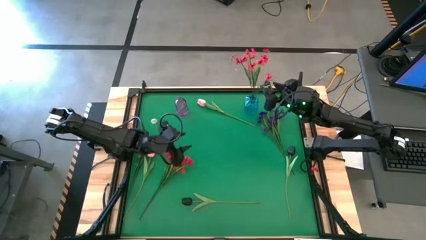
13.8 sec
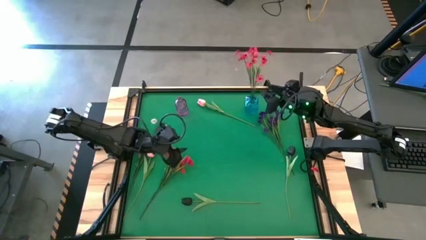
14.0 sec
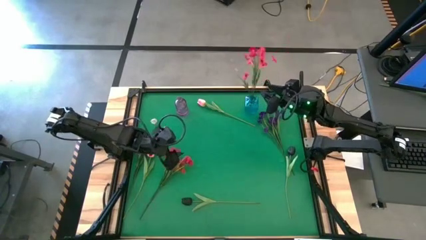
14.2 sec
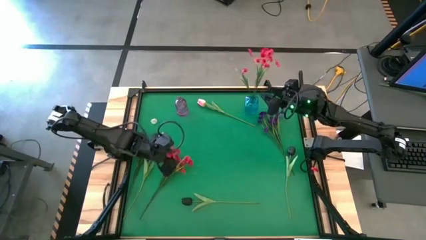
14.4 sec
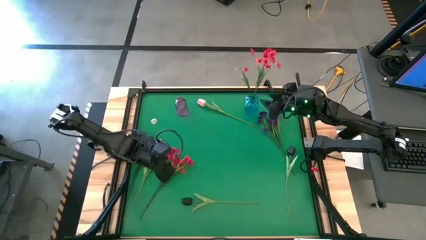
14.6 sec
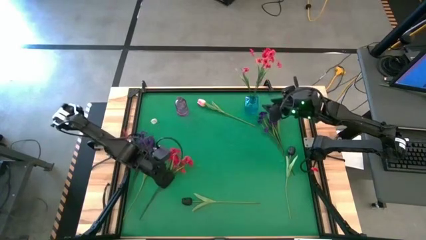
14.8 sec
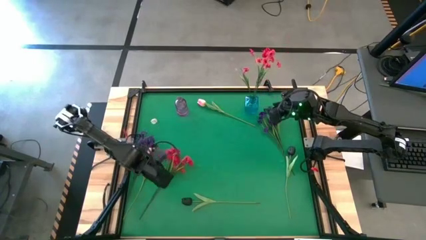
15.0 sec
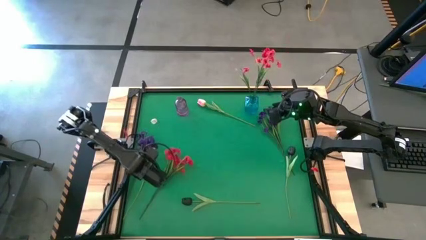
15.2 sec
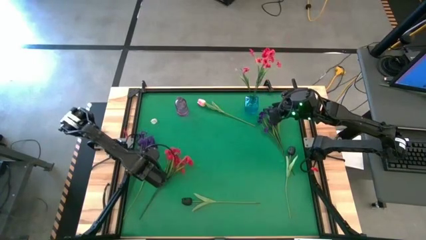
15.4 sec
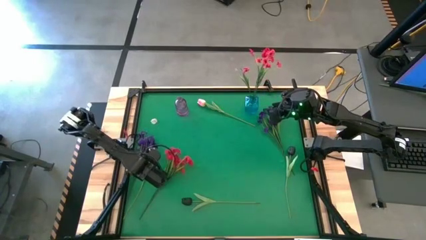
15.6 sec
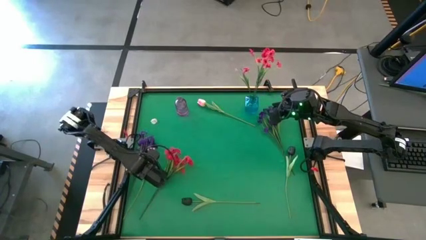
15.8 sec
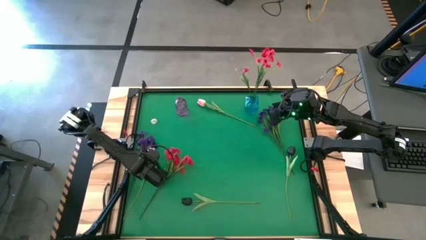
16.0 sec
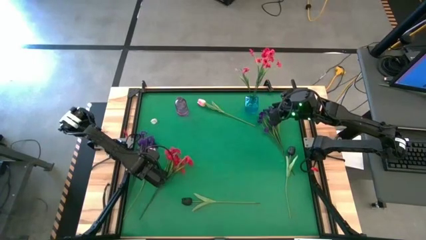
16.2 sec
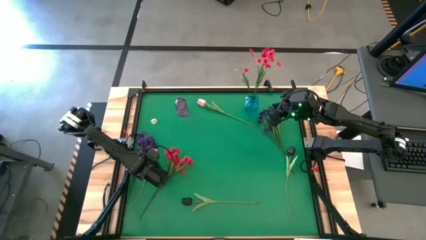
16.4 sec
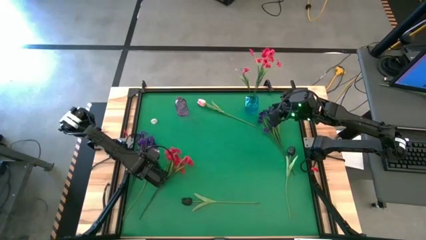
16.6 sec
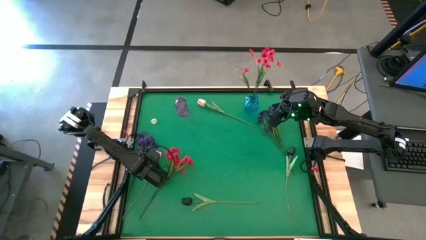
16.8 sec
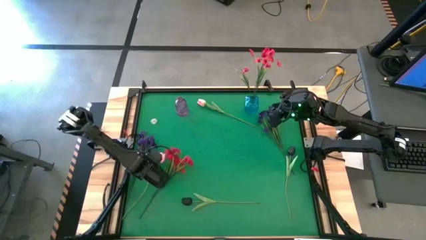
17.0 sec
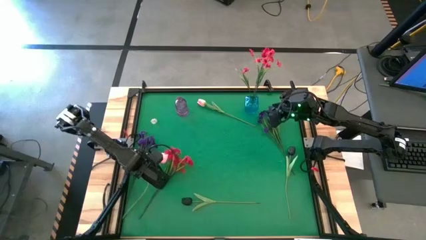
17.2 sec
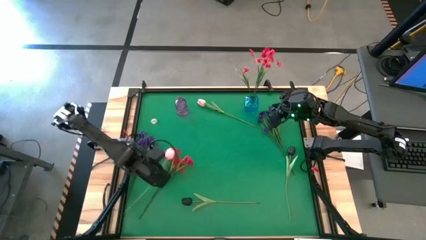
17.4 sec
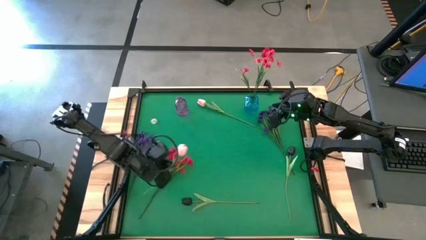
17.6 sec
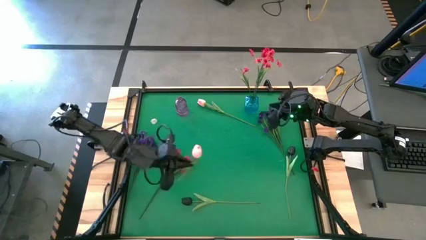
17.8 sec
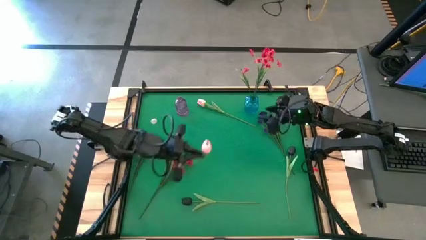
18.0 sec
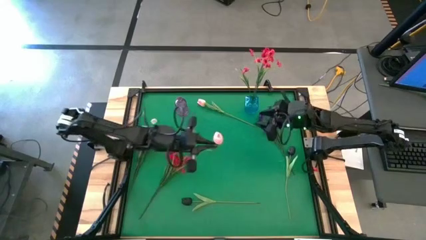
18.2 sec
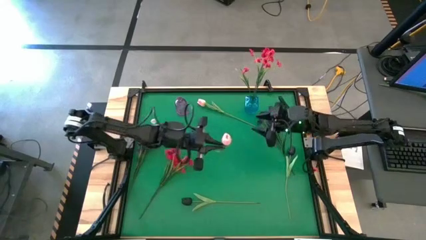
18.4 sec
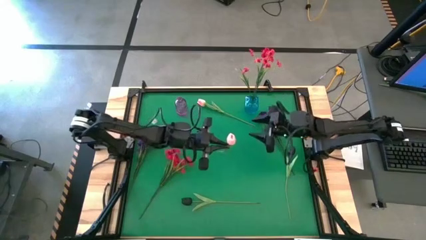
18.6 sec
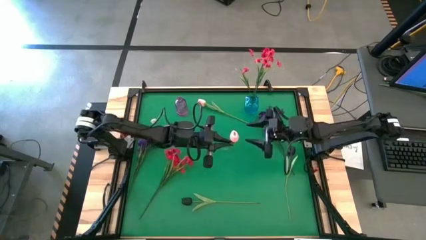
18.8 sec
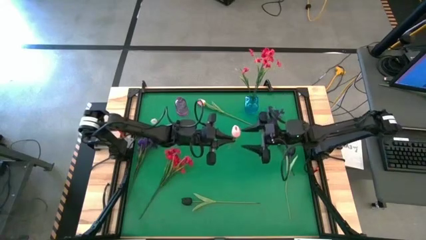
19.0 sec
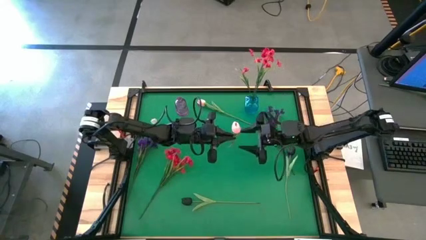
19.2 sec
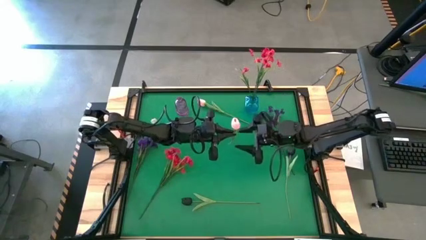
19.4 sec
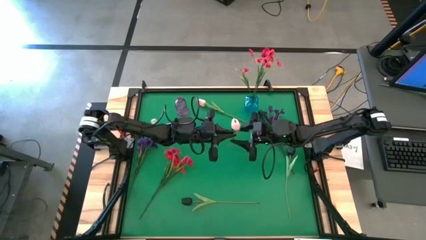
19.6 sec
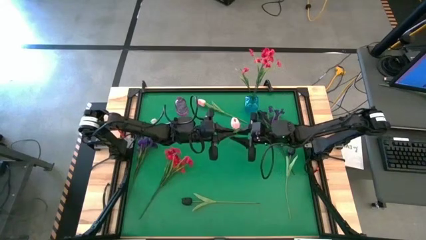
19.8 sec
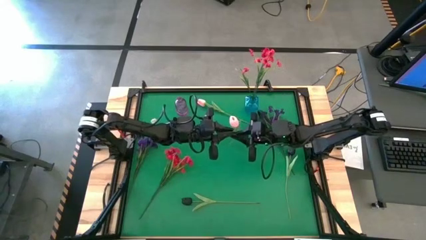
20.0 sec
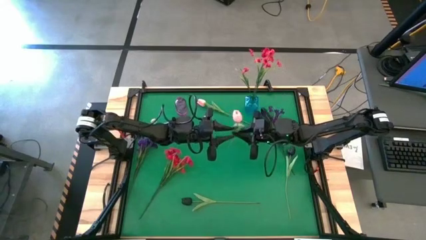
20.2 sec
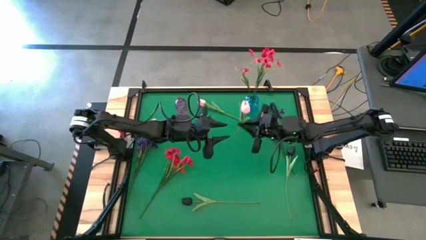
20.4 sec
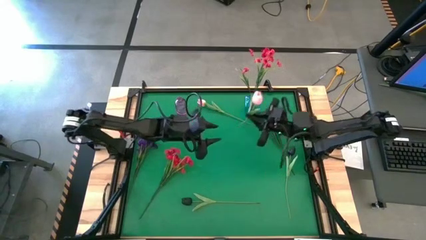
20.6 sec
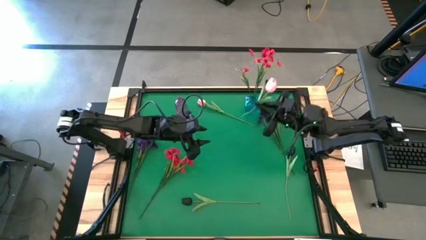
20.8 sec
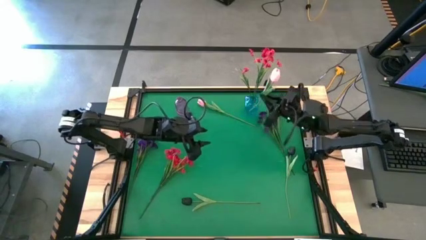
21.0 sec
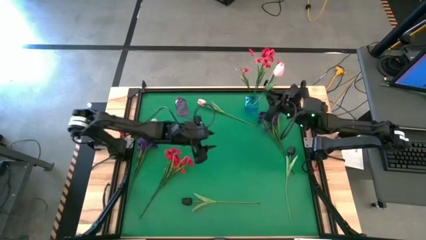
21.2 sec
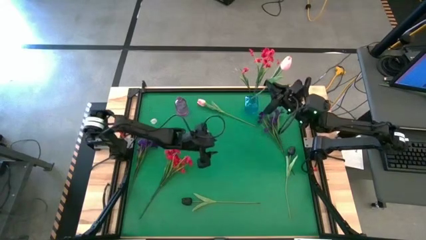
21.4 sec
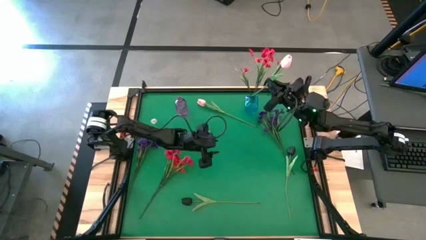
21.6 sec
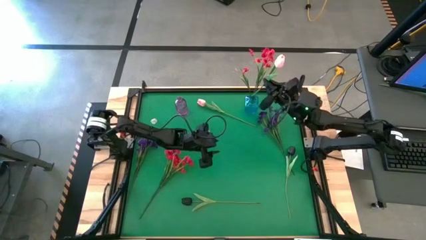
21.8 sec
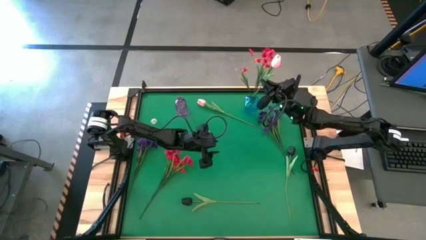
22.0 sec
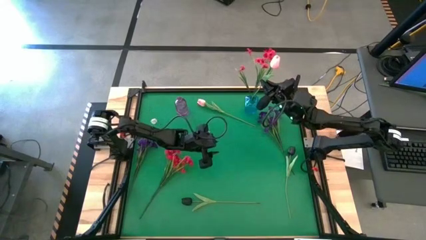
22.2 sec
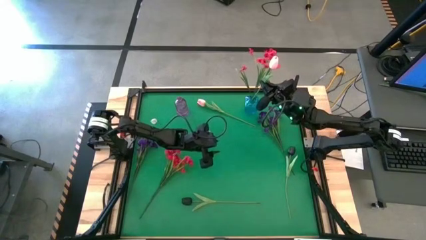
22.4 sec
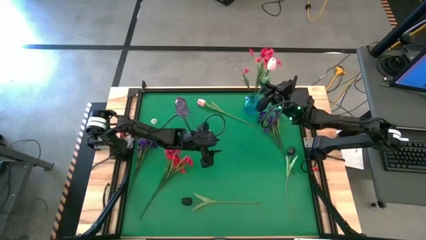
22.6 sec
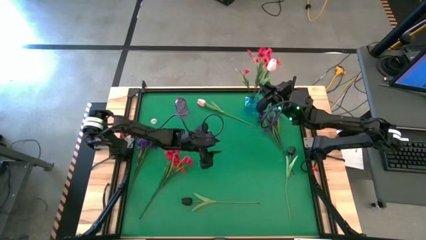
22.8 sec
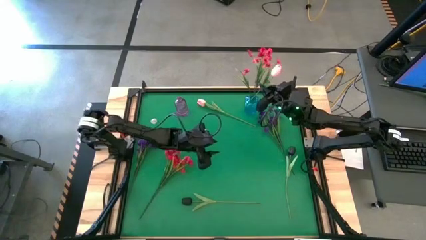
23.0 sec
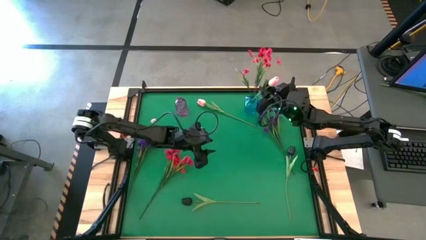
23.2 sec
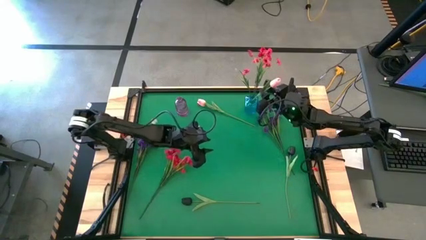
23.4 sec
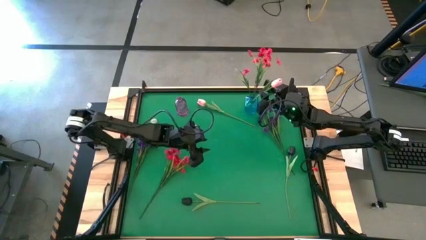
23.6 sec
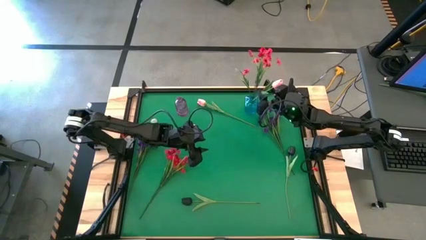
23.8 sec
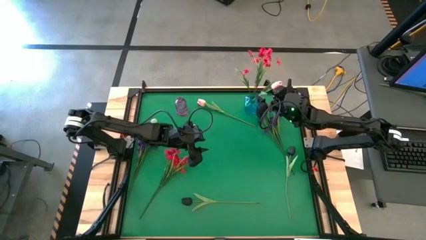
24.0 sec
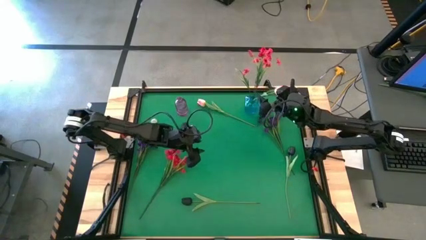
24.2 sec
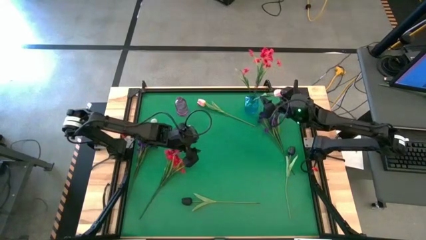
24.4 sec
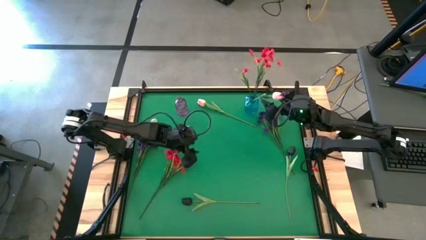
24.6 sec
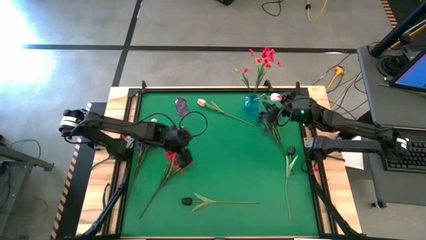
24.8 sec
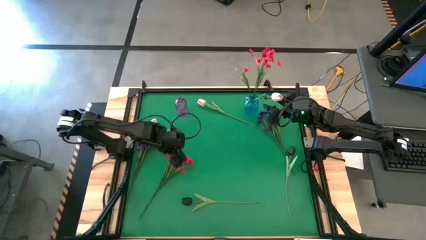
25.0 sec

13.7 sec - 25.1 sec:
Task: Sort flowers into vase by color
Put the bottom pink flower into the blue vase

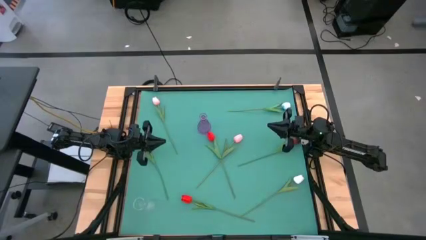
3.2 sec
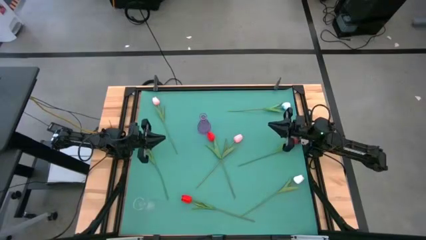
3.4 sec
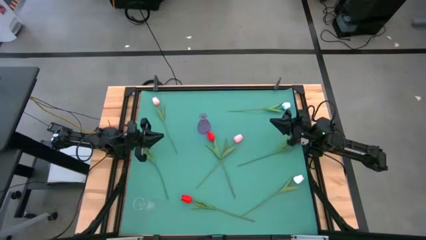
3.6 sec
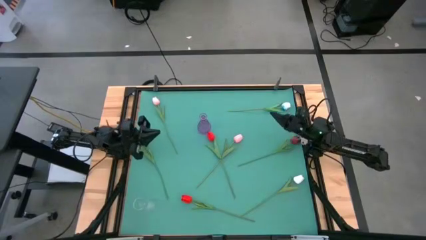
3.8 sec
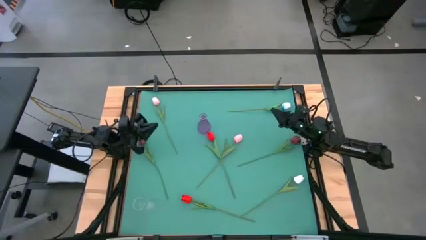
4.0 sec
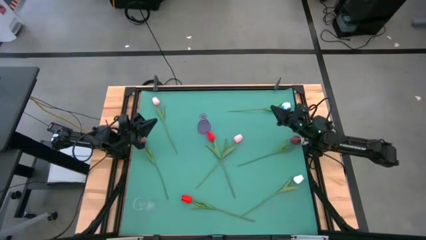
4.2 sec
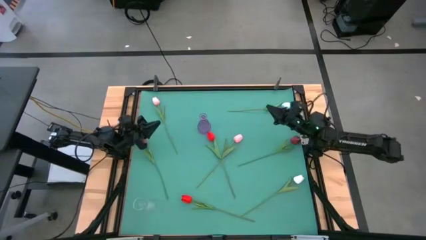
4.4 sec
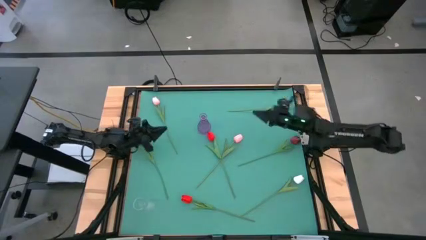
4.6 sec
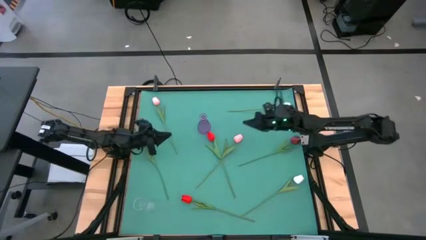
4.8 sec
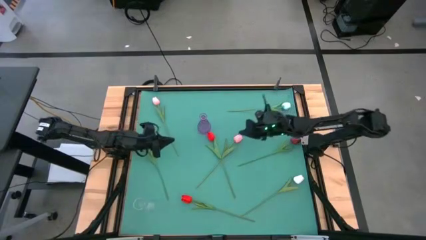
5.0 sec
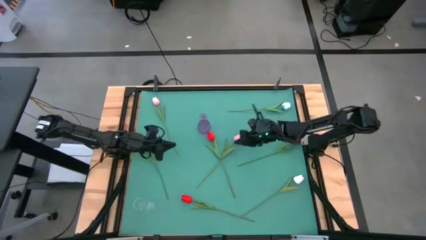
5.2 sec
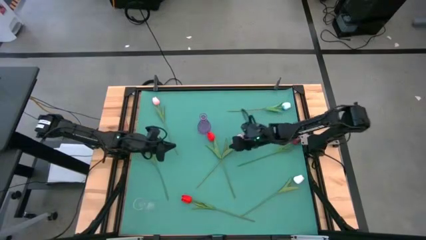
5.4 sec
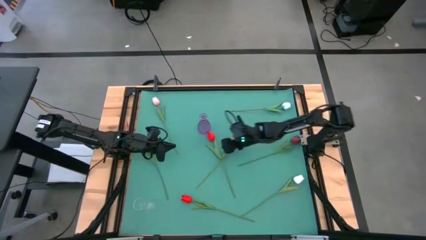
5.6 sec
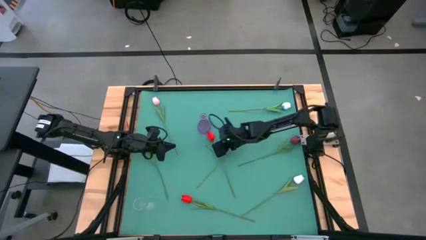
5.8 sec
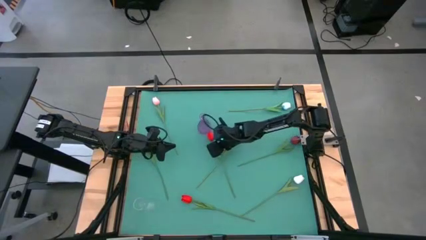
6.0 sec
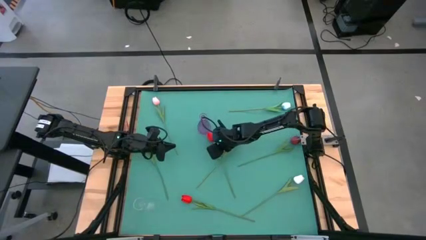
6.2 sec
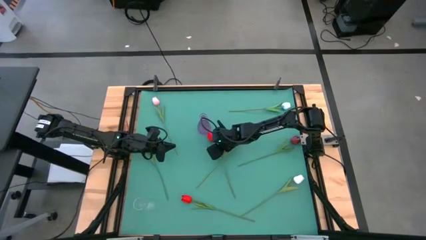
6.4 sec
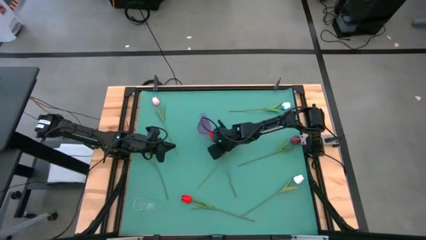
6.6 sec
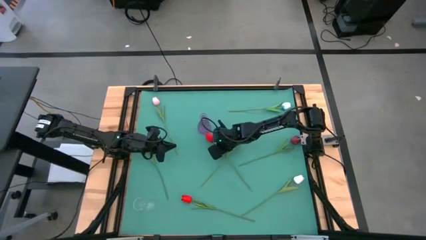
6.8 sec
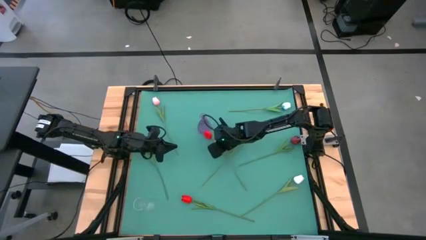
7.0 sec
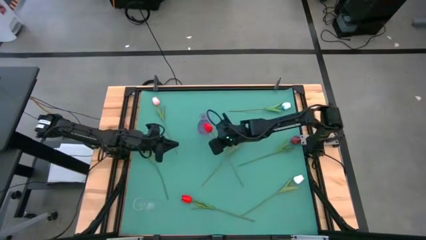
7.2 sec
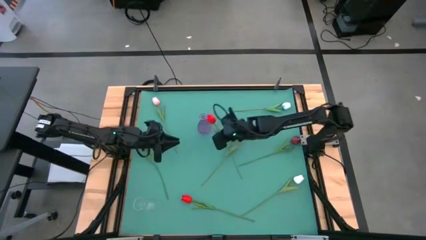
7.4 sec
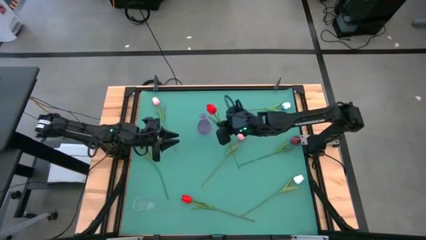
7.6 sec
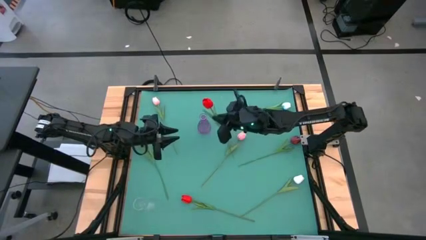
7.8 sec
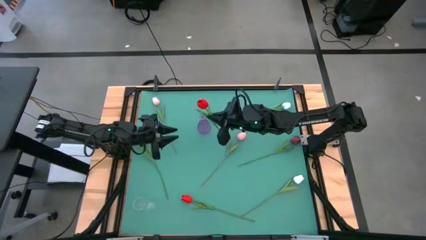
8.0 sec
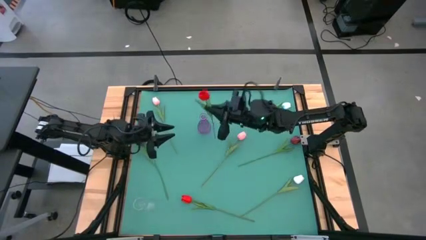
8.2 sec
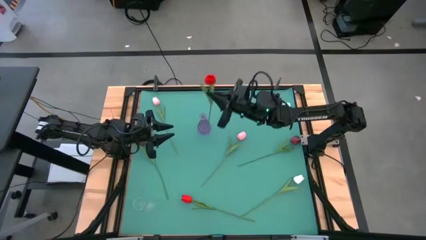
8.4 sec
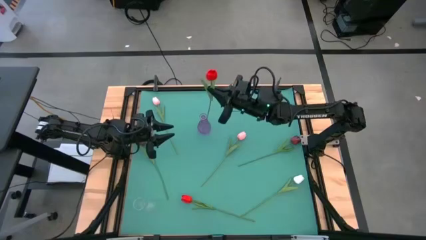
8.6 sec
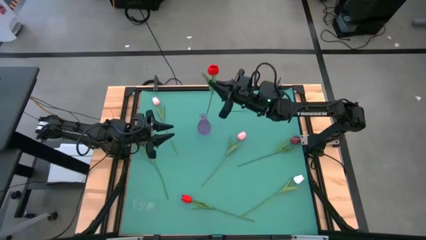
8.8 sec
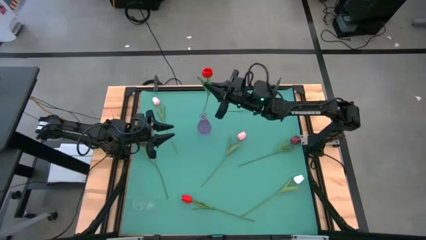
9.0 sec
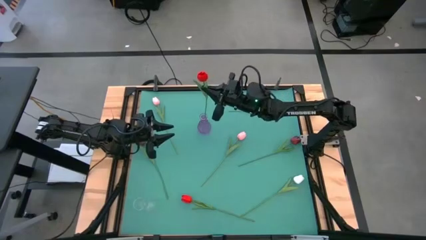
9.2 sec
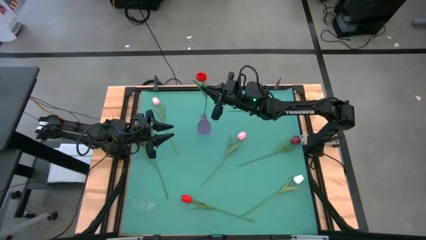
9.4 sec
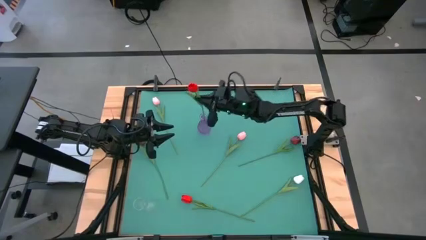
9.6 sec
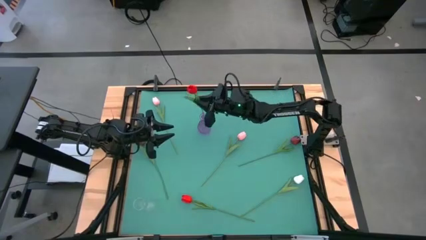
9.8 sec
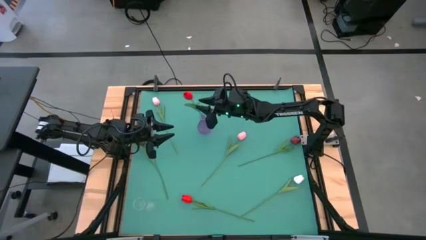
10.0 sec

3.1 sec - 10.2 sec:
Task: Sort flowers into vase by color
Put the top red flower into the violet vase
